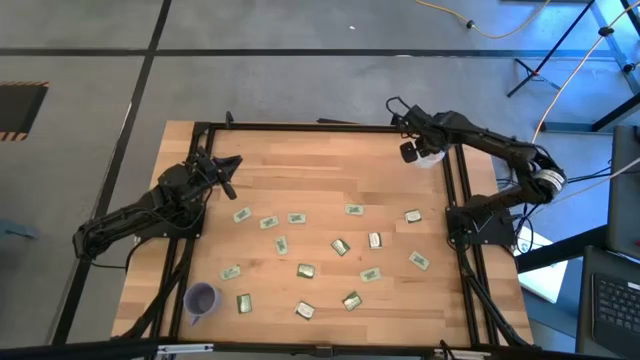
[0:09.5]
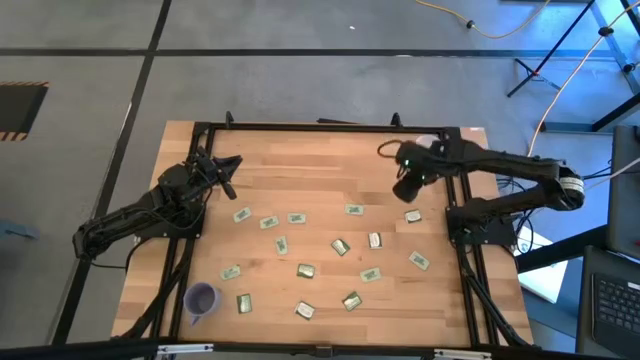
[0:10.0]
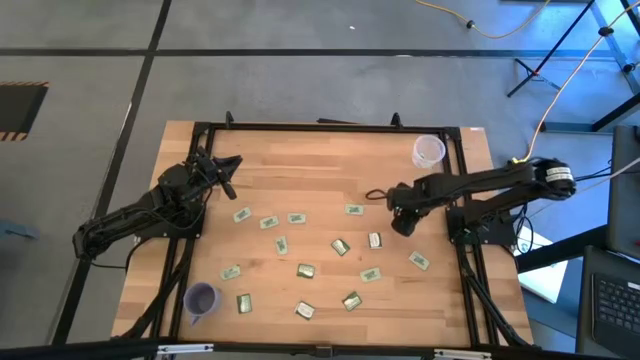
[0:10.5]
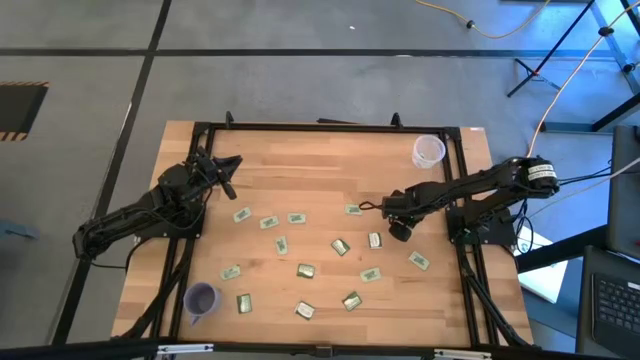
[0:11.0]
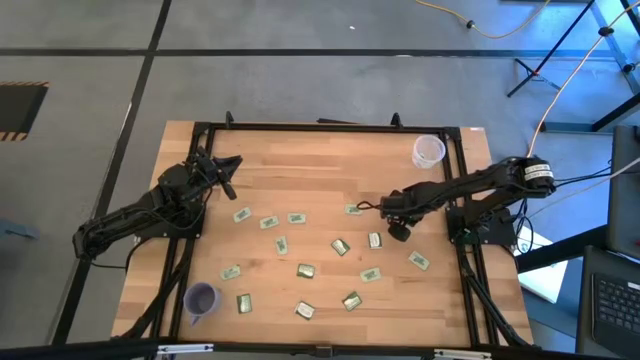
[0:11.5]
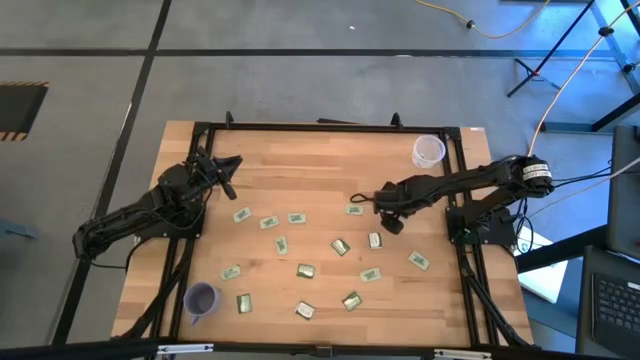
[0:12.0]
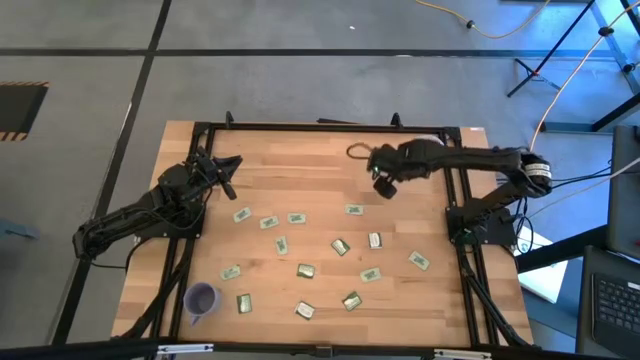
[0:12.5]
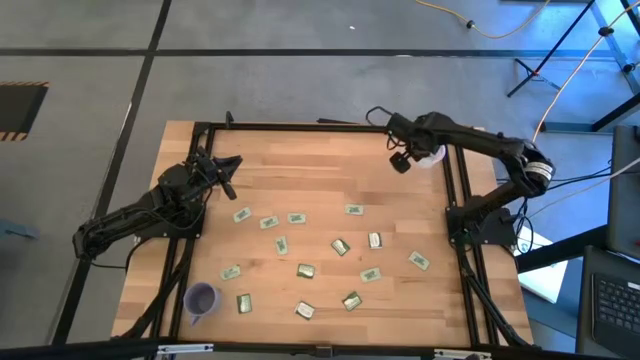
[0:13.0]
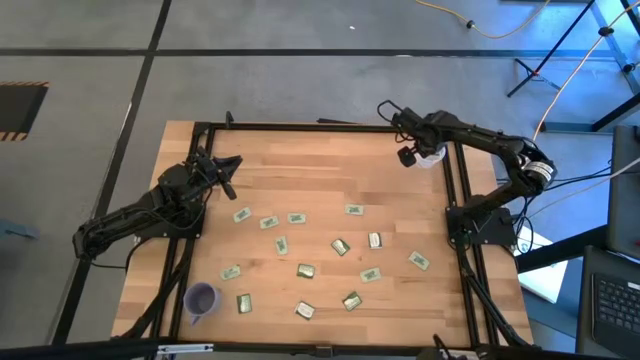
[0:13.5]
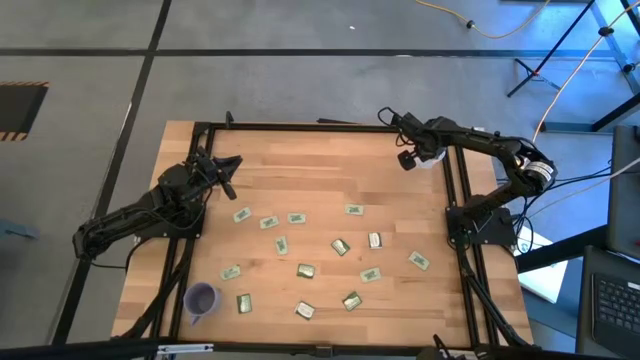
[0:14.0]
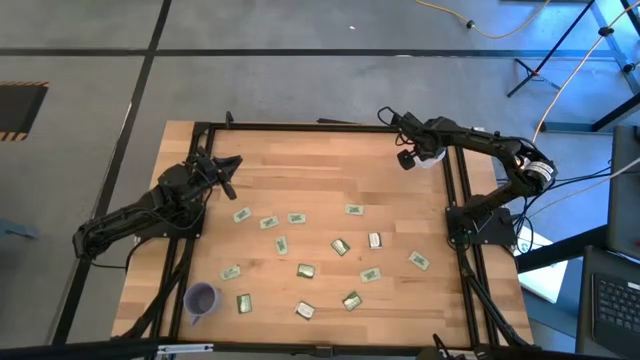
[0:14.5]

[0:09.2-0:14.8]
Task: Pick and place Stevia / Truvia into bins
Put the green stevia packet into the transparent container

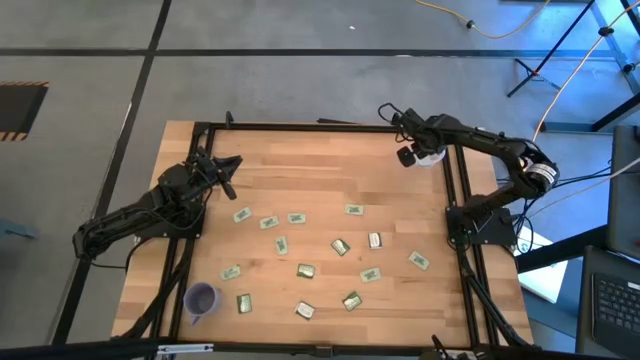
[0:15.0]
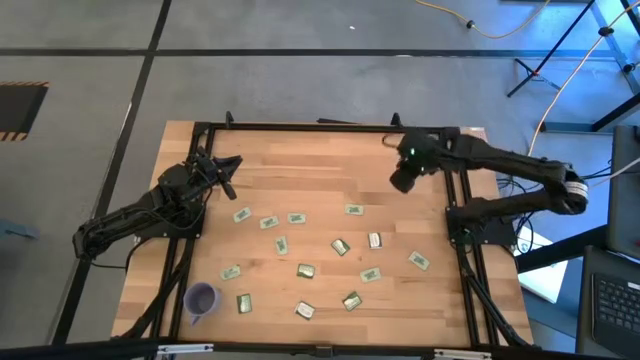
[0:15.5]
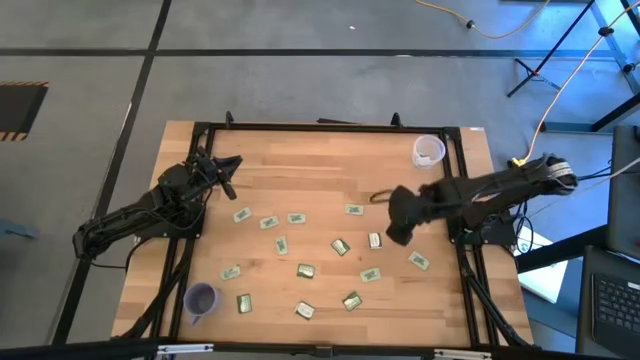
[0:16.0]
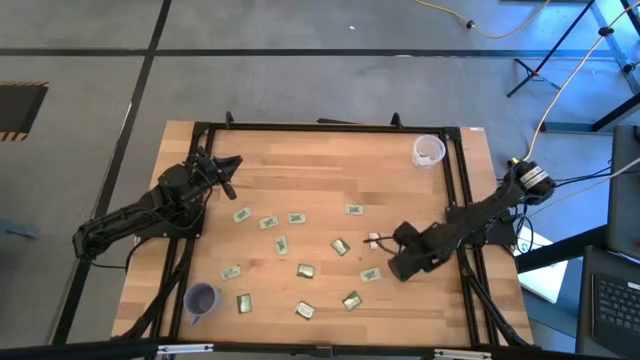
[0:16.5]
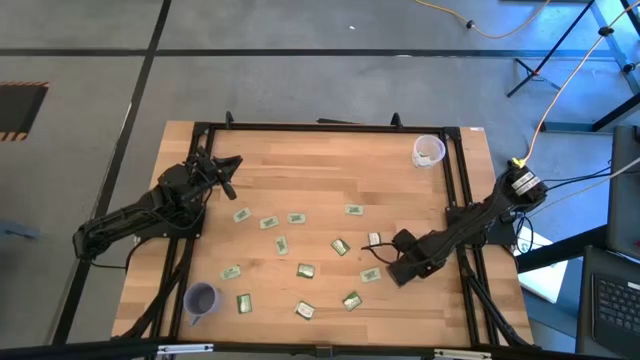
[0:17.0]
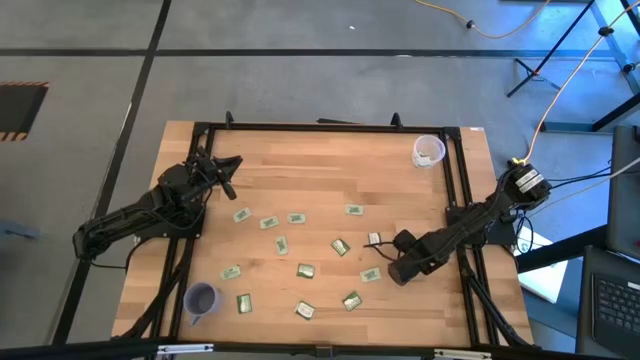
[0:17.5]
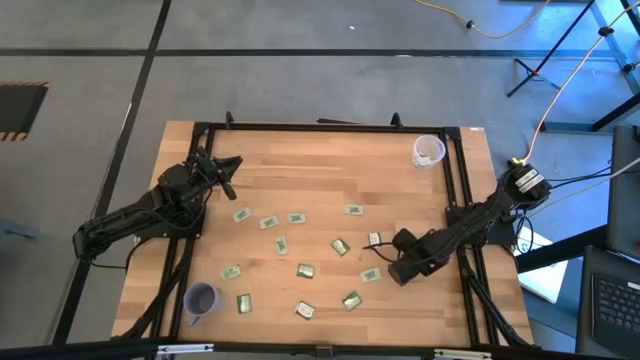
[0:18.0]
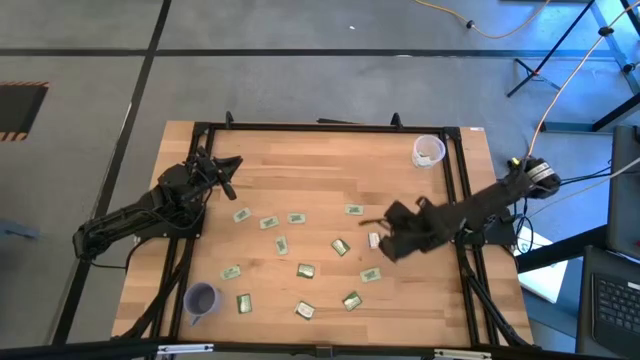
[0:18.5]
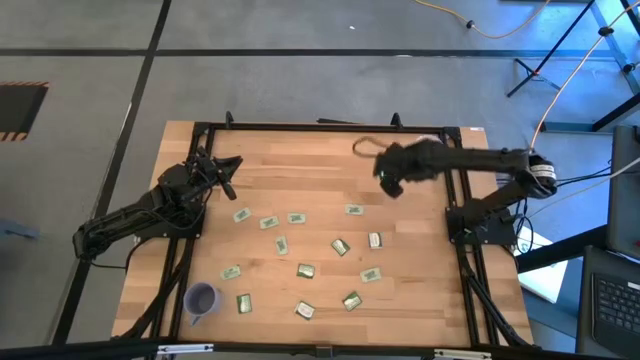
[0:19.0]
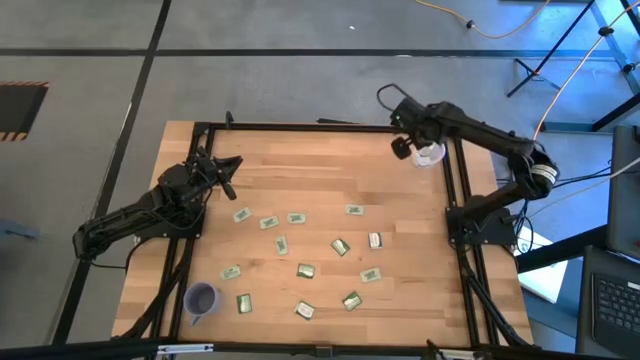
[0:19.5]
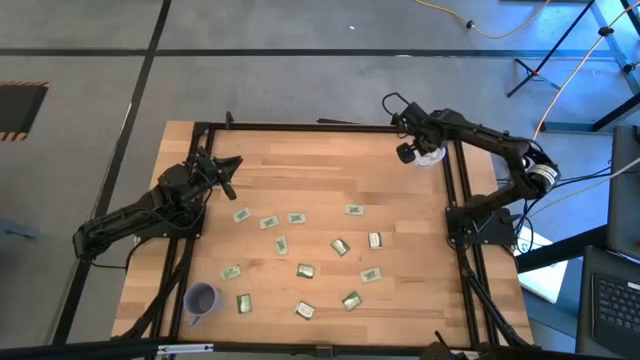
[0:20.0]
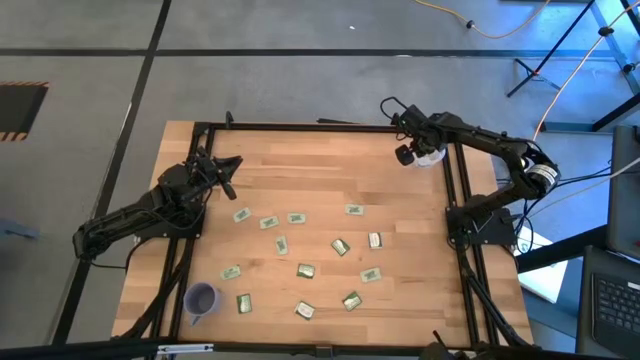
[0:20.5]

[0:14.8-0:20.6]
Put the light green stevia packet into the transparent container

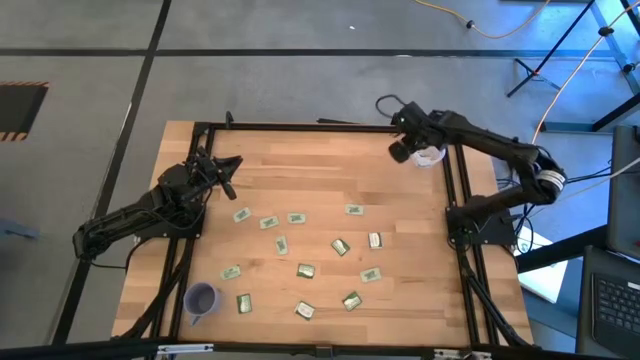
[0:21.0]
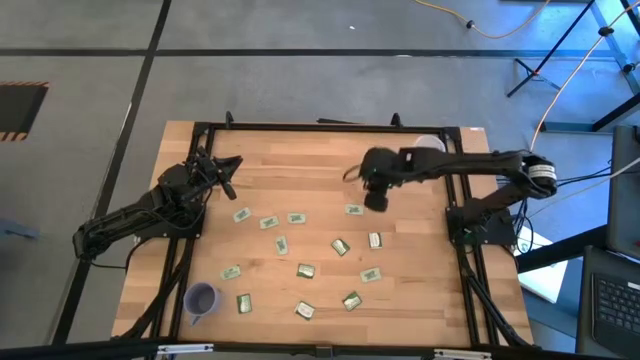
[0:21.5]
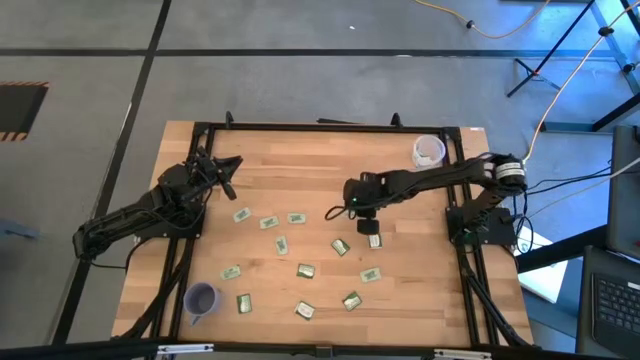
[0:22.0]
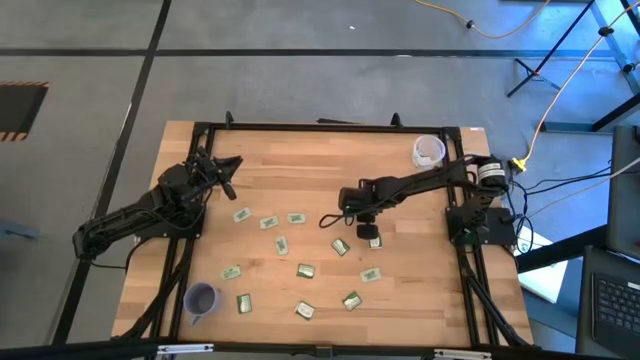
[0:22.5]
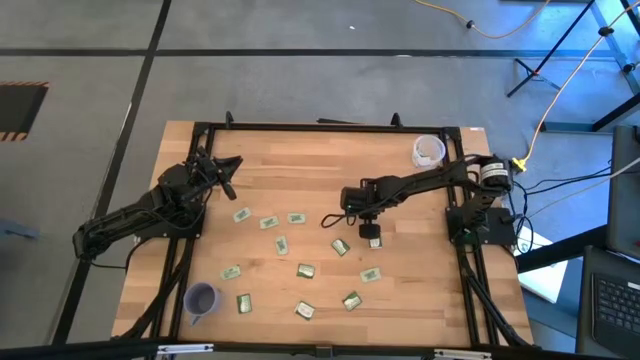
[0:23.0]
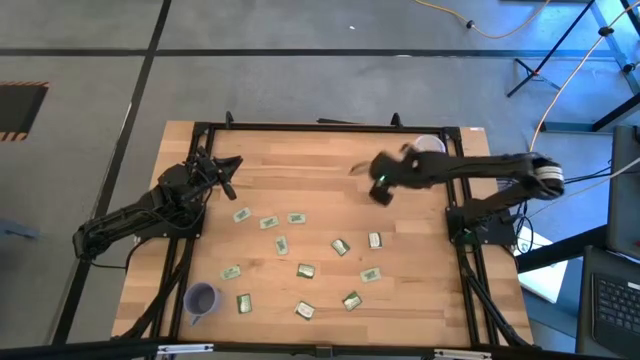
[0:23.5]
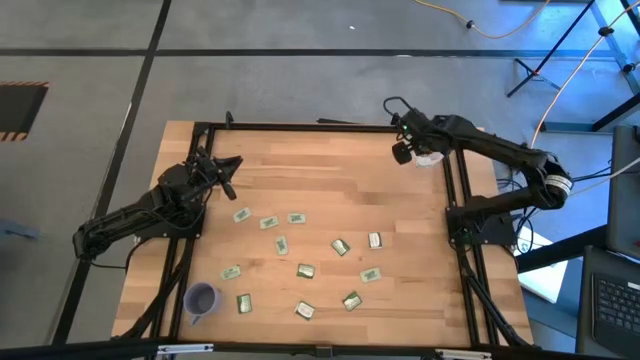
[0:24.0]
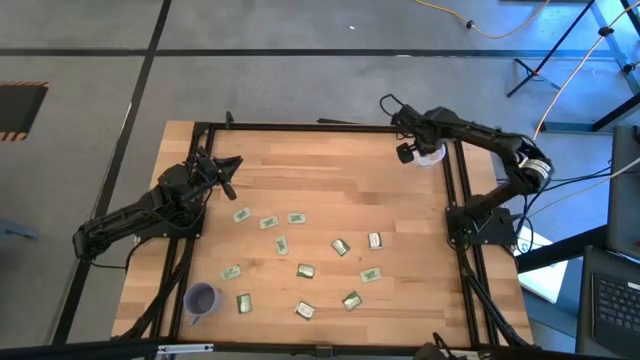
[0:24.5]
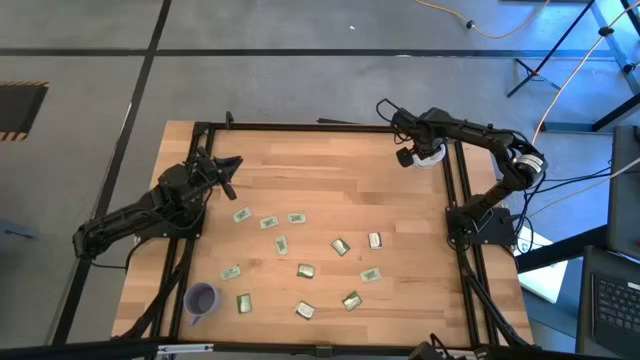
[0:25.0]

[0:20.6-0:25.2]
Put the light green stevia packet into the transparent container

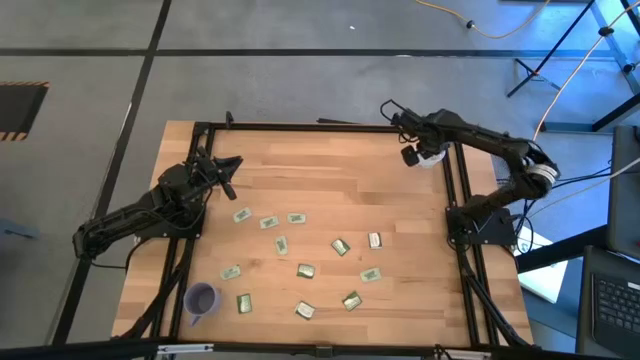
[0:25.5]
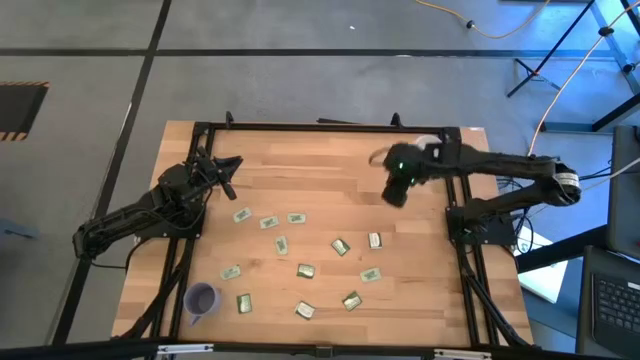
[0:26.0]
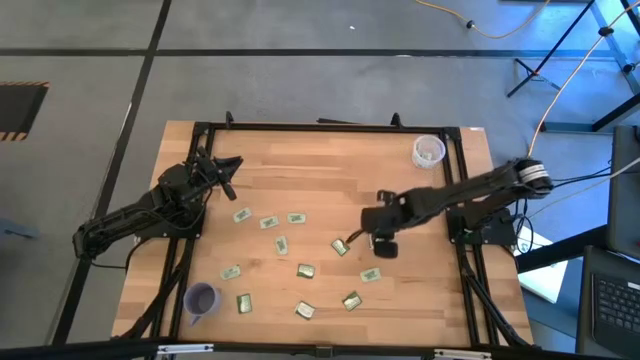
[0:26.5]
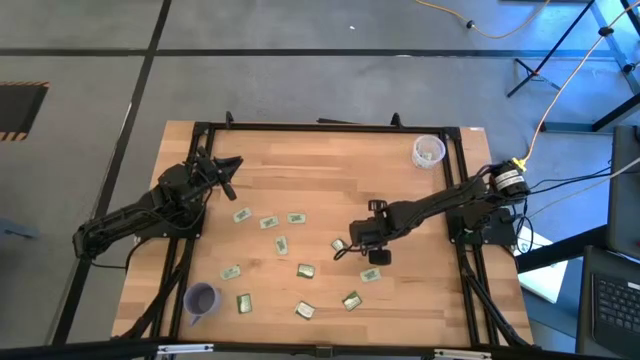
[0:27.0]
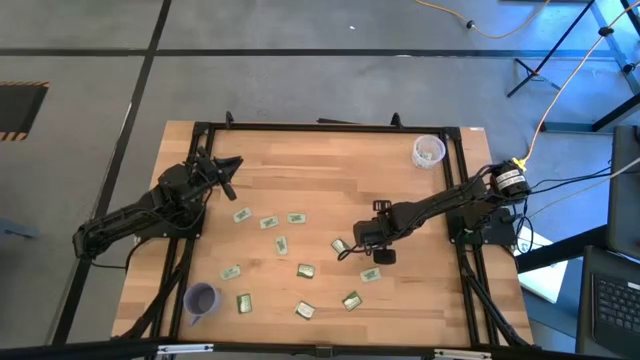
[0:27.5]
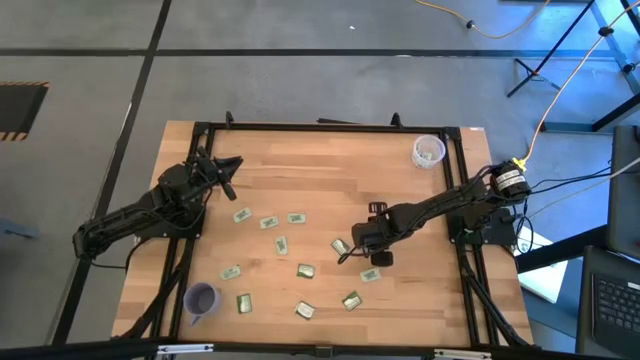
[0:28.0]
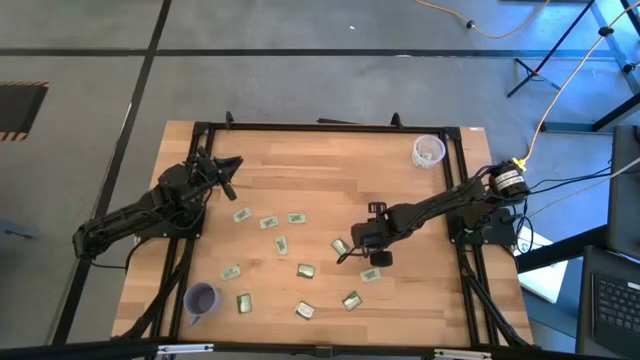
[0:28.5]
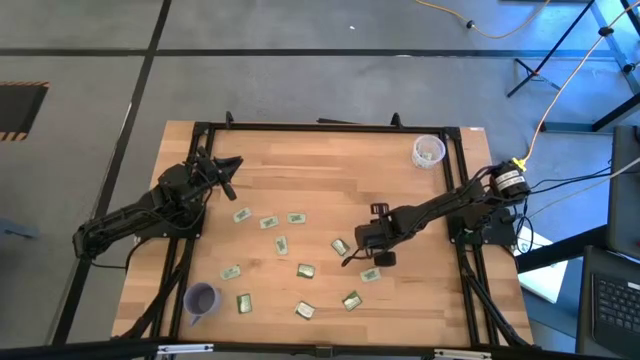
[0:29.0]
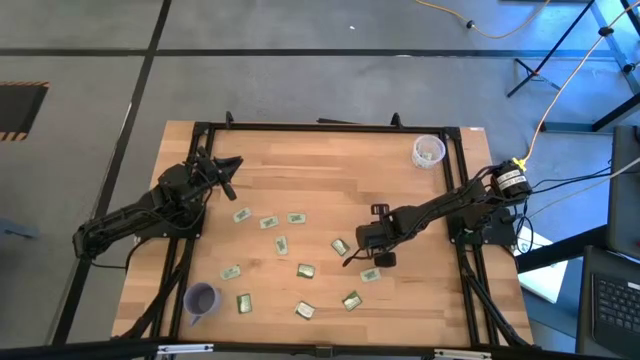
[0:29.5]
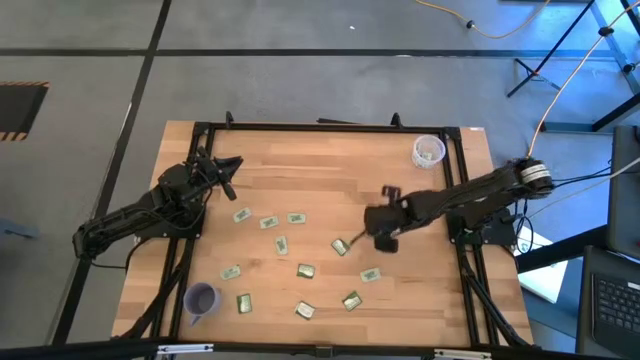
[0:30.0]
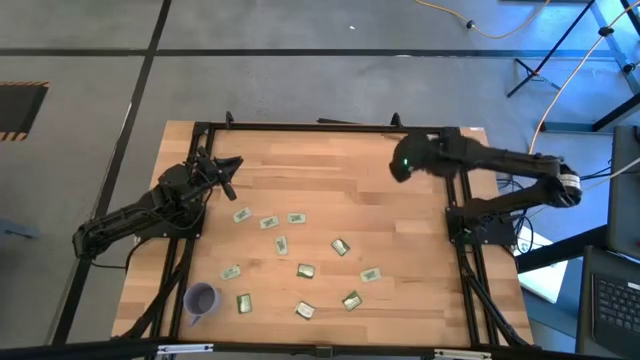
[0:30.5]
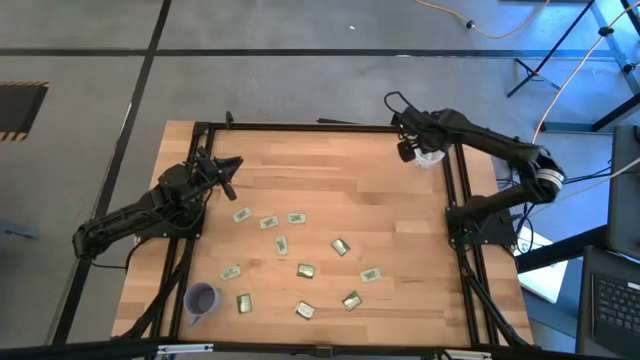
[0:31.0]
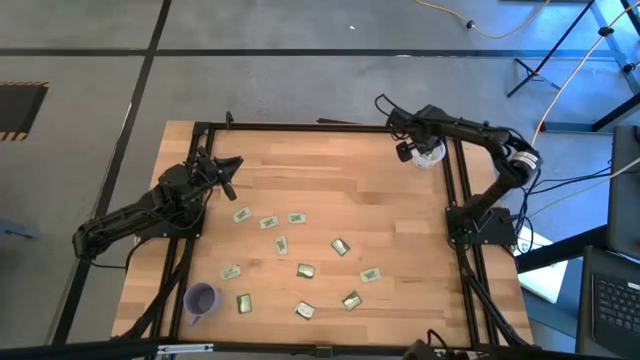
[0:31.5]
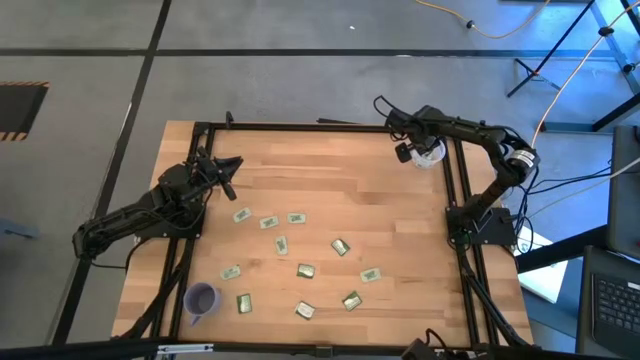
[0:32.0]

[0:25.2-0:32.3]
Put the green stevia packet into the transparent container
